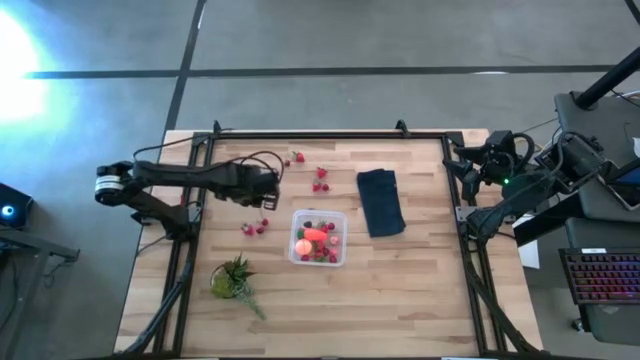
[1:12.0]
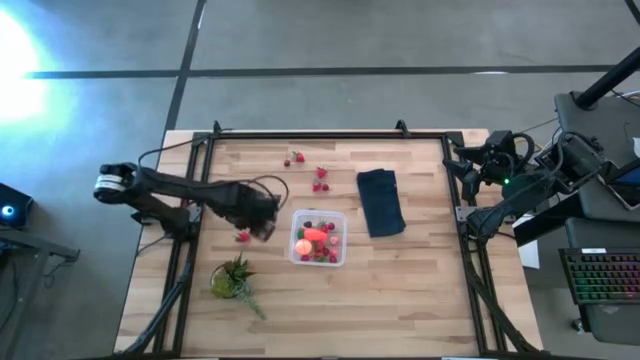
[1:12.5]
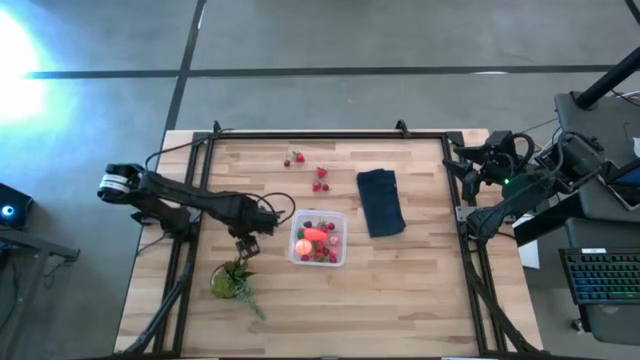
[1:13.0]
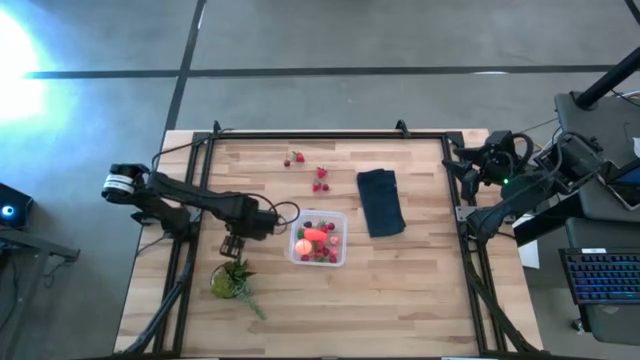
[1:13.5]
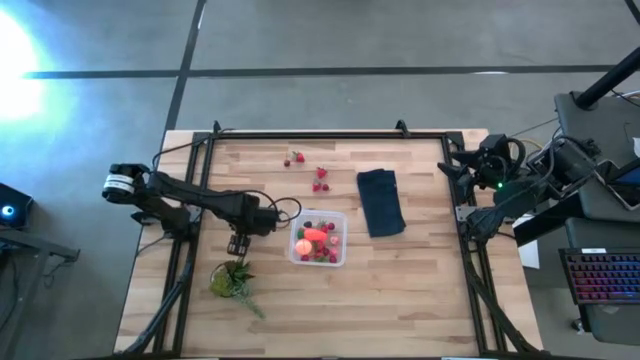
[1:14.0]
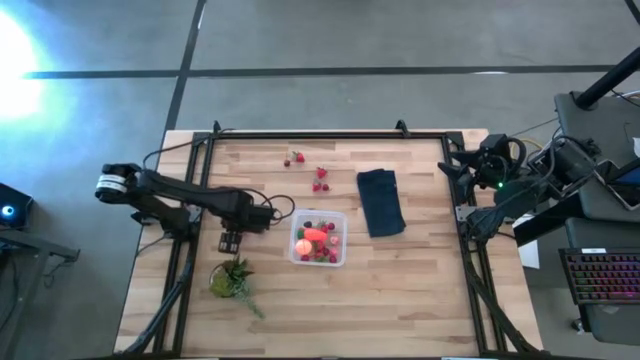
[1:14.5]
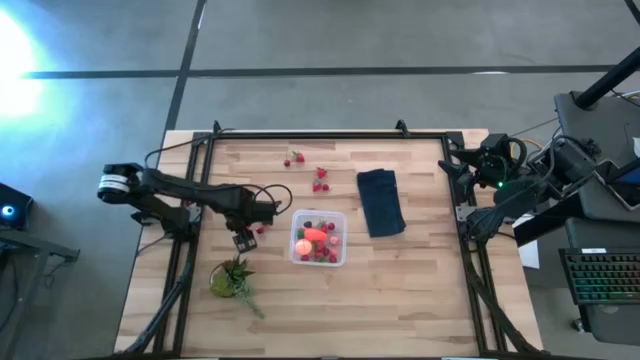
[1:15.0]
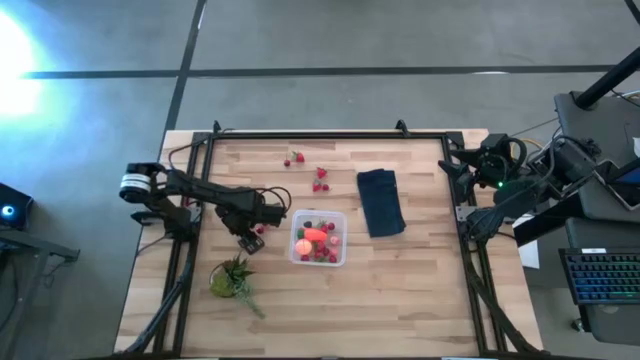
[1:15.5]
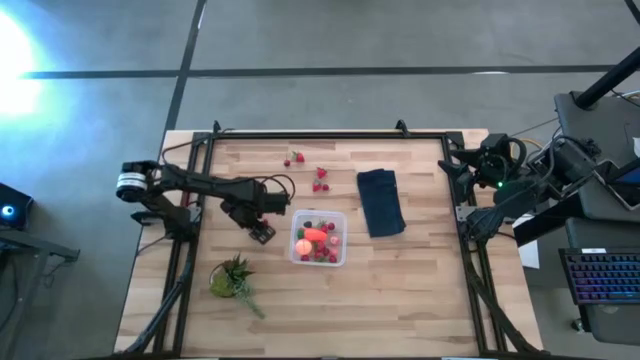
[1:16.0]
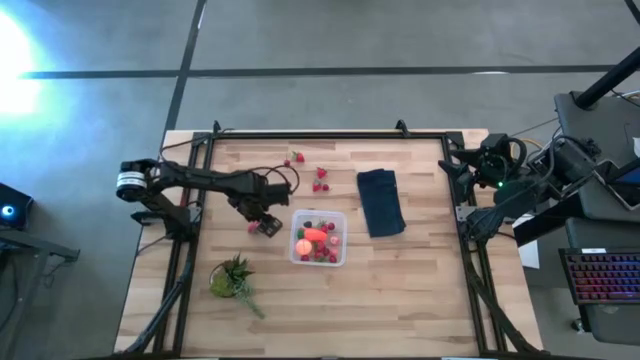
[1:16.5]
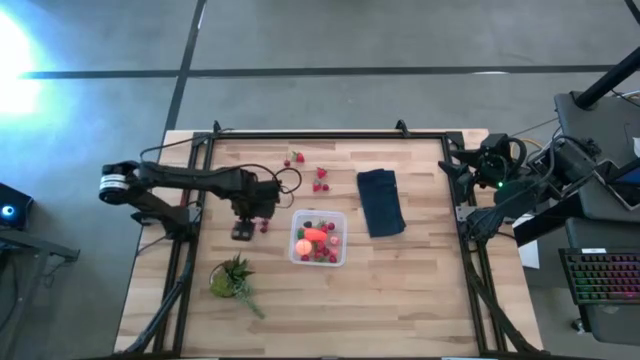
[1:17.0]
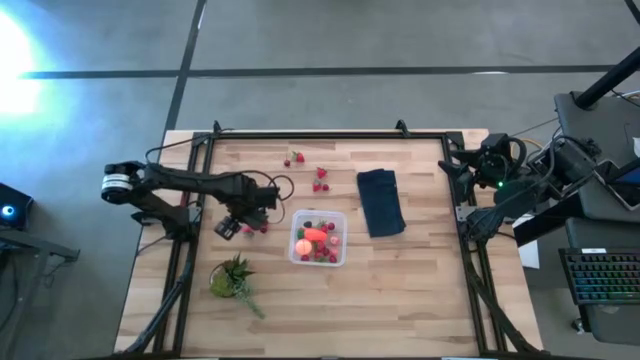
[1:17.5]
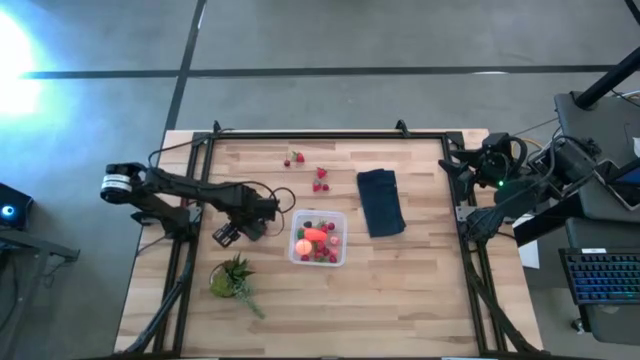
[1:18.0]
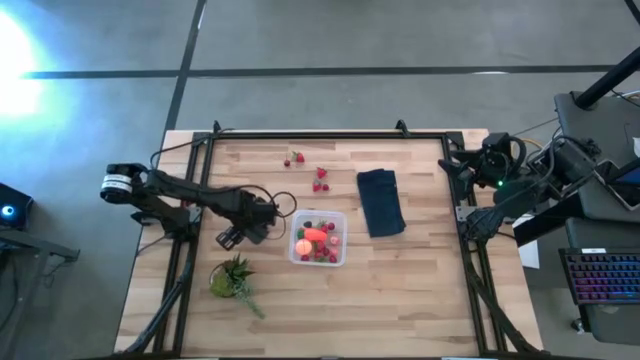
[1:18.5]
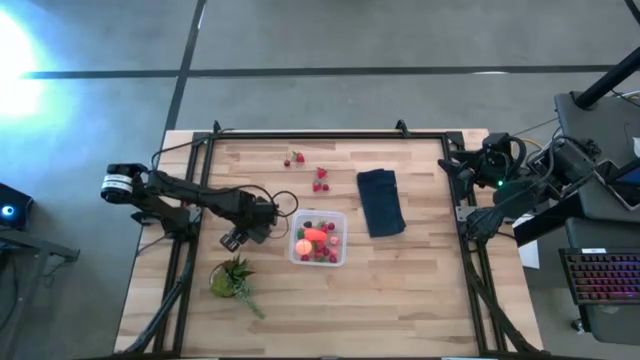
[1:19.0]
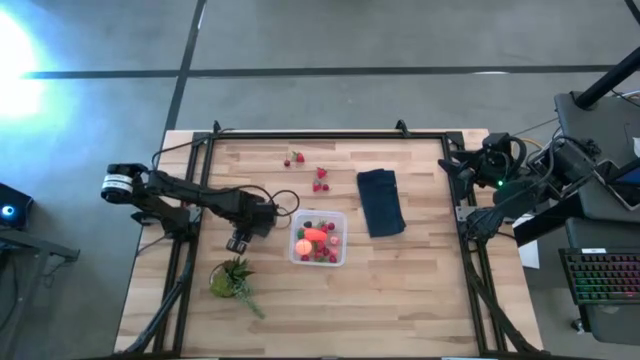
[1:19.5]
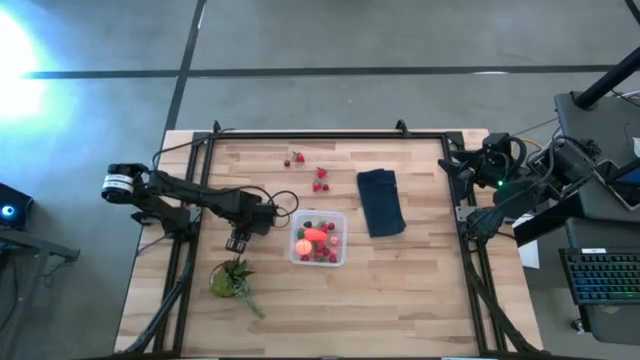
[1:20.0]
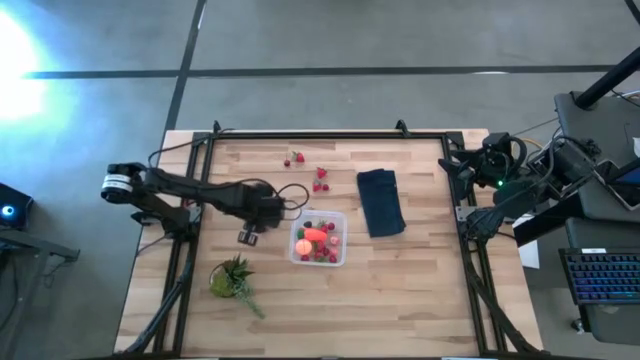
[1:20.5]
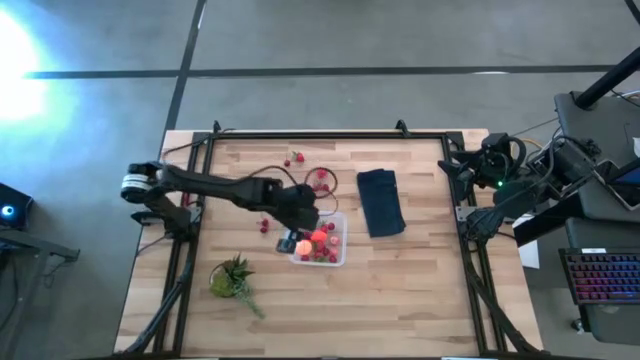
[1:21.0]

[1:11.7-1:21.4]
Task: Pick and placing Produce into tupperware
Put the red strawberry into the transparent bin

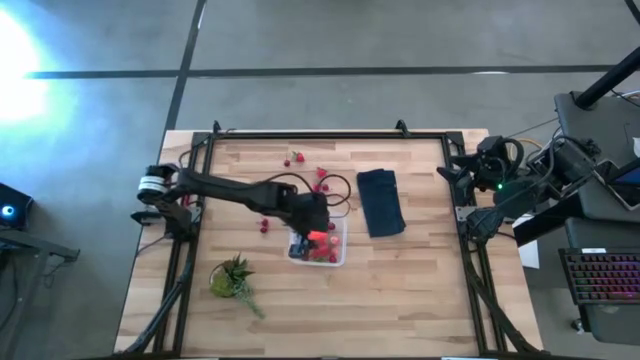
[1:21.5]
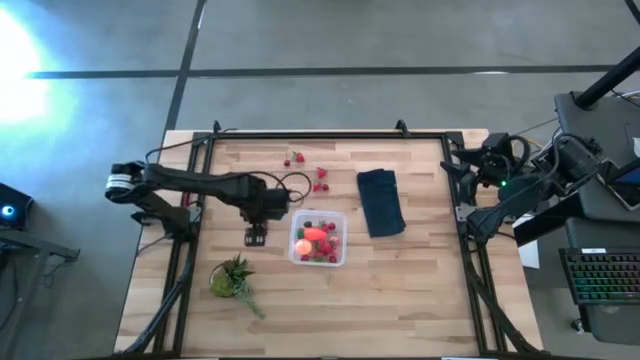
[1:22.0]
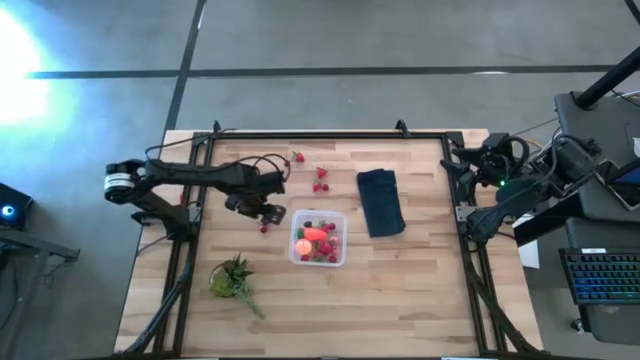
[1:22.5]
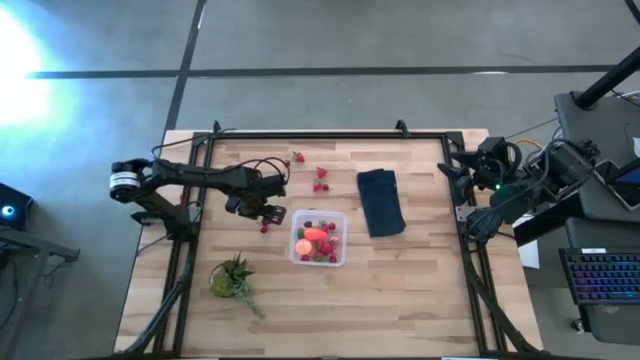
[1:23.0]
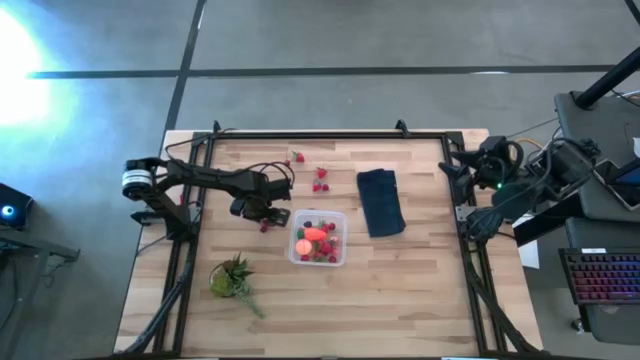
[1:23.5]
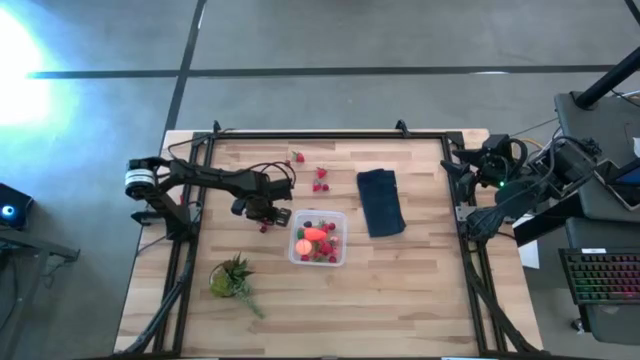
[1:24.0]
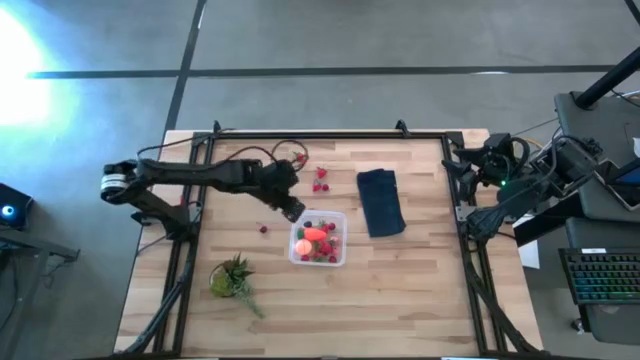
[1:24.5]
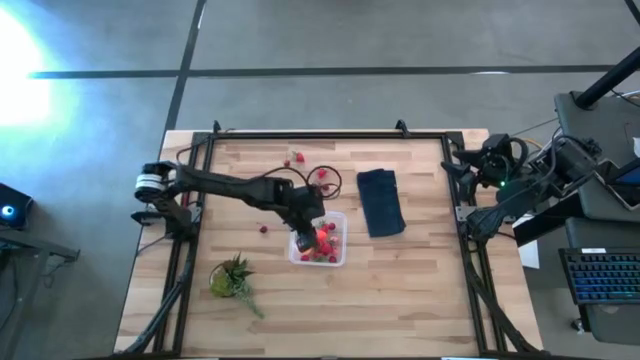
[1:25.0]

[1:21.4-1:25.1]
Put the red cherry into the transparent bin

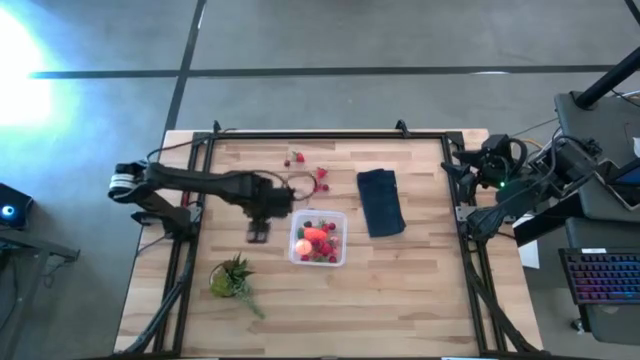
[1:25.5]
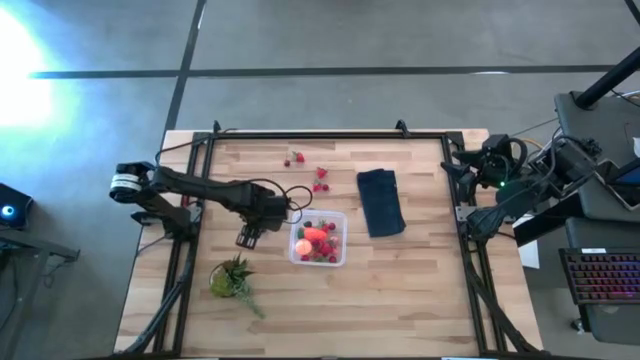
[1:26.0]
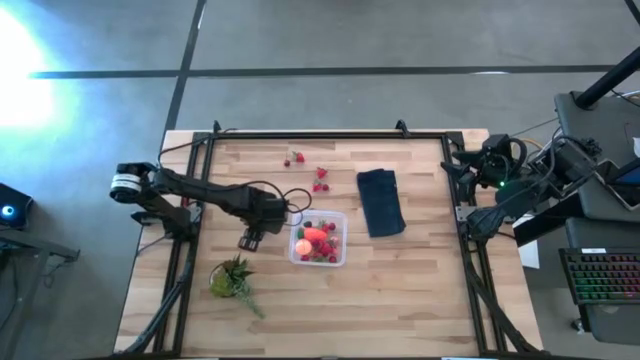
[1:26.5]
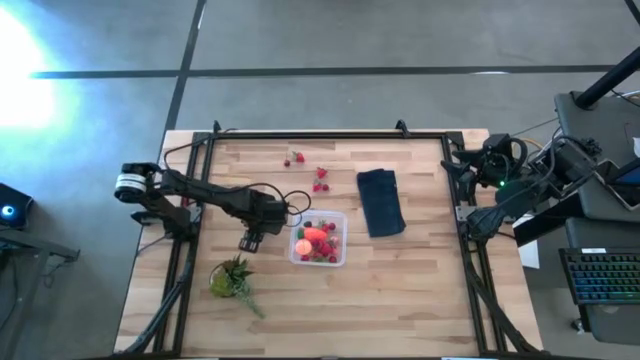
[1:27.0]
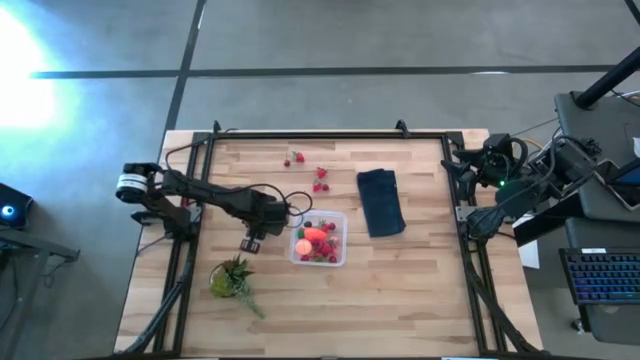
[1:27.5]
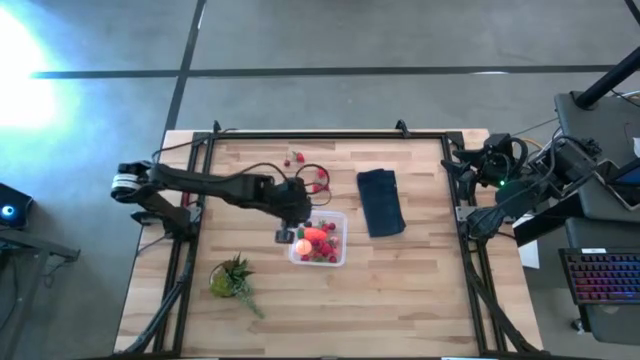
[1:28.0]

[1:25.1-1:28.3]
Put the red cherry into the transparent bin

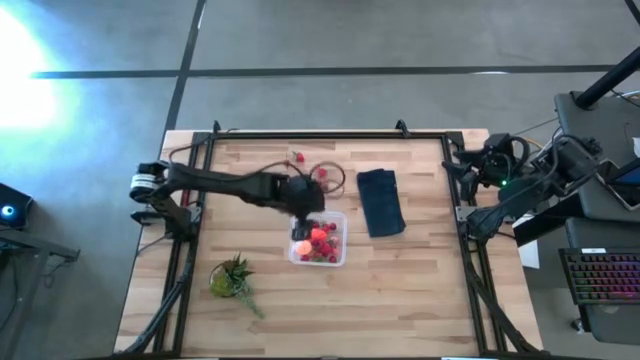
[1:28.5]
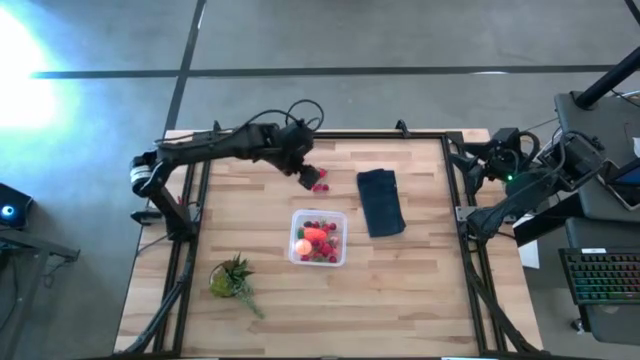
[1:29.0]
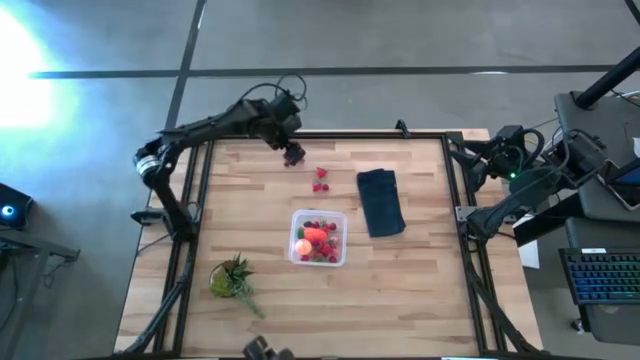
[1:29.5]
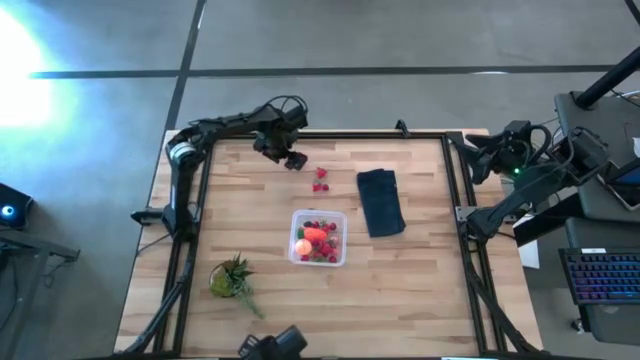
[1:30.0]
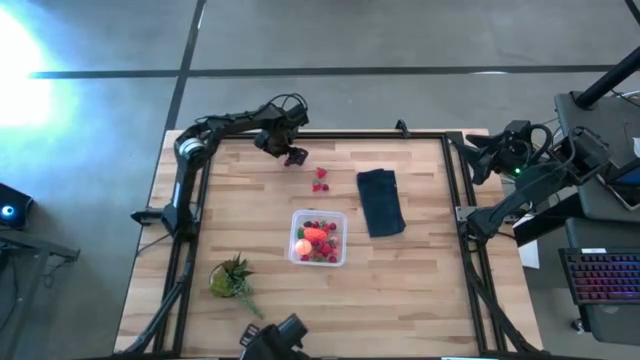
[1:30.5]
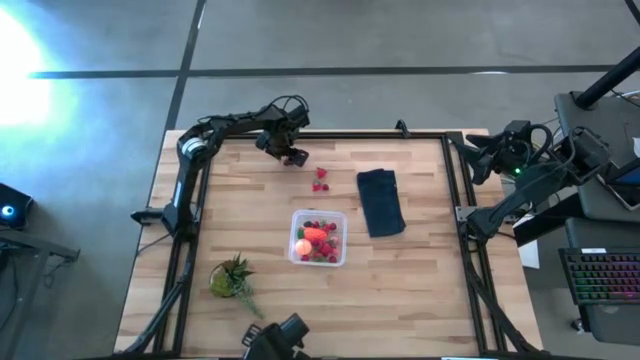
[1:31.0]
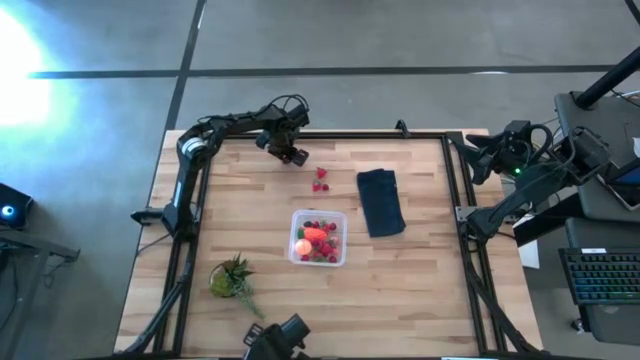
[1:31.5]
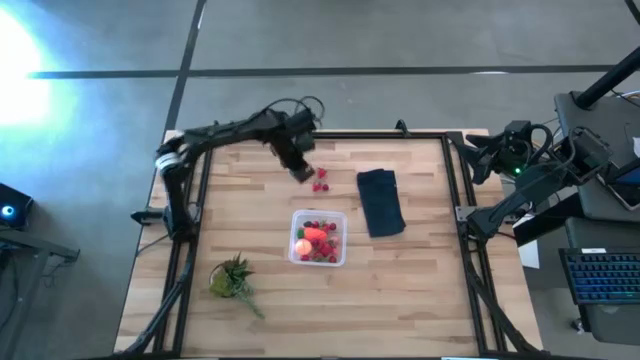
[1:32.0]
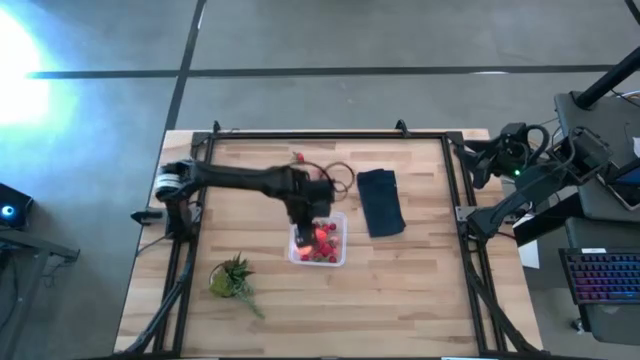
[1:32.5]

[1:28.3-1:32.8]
Put the red cherry into the transparent bin
